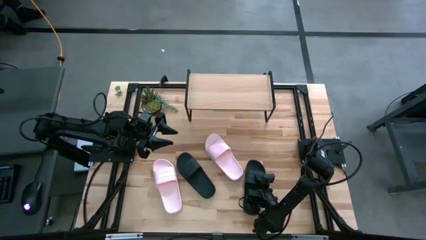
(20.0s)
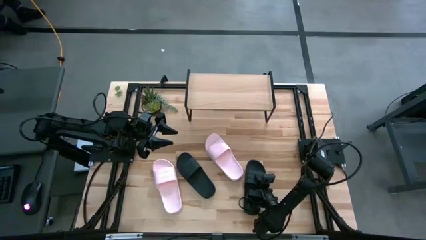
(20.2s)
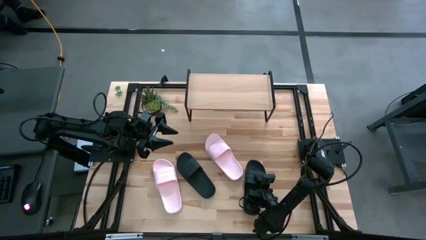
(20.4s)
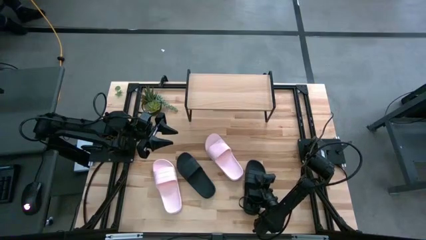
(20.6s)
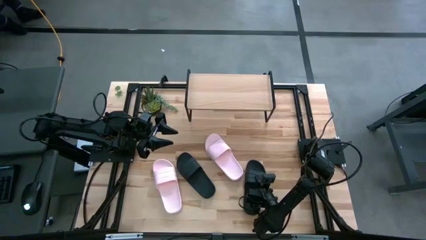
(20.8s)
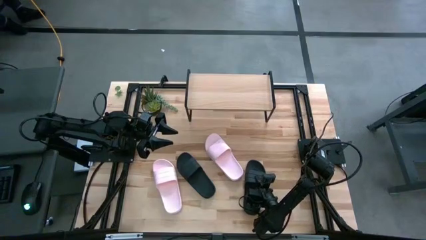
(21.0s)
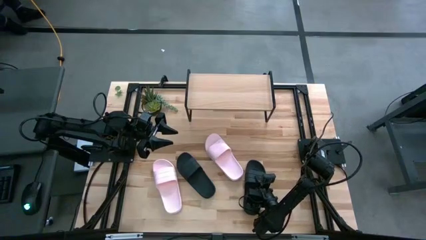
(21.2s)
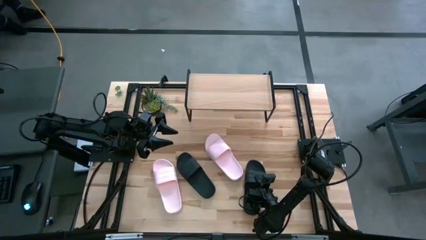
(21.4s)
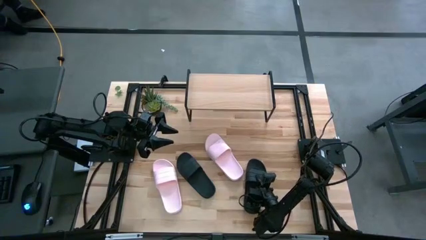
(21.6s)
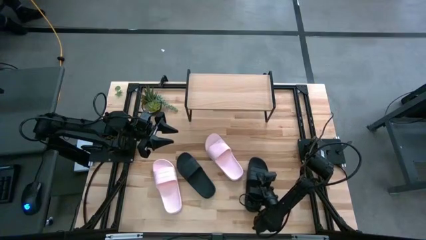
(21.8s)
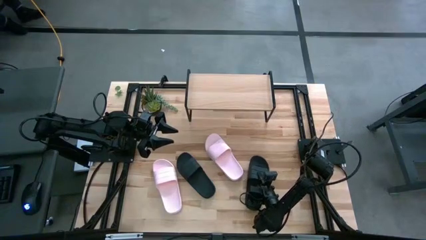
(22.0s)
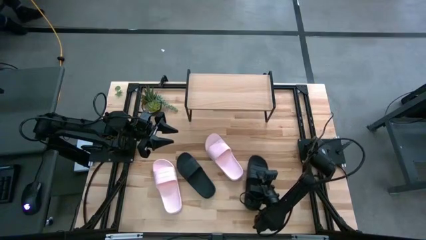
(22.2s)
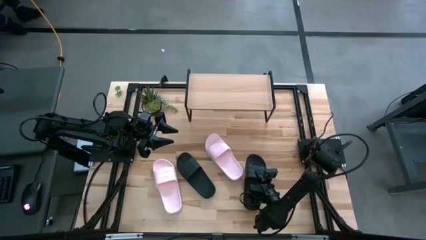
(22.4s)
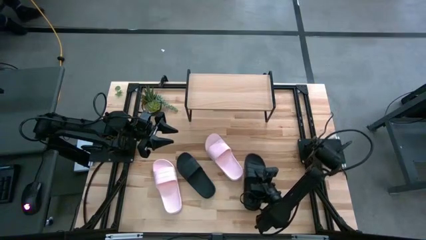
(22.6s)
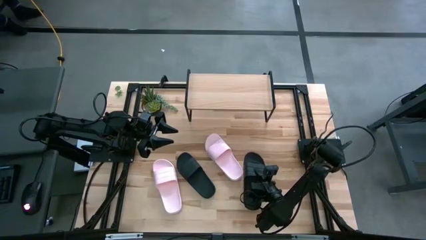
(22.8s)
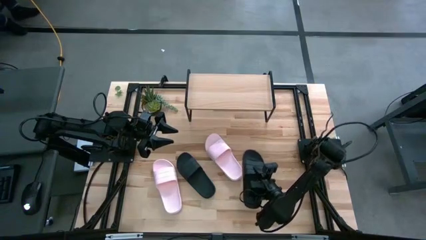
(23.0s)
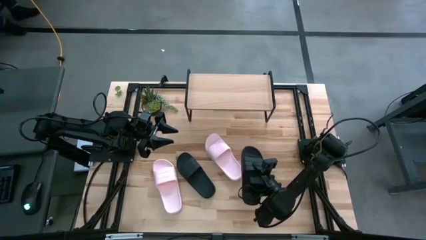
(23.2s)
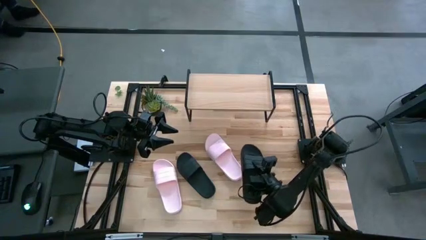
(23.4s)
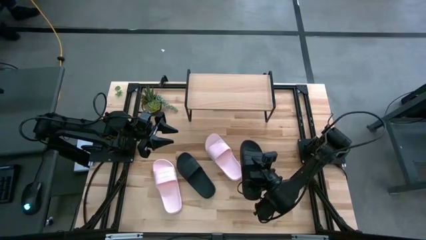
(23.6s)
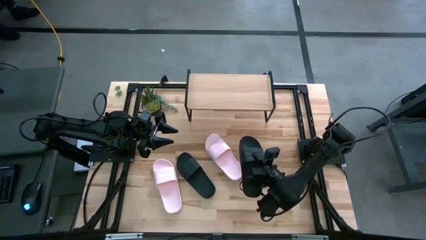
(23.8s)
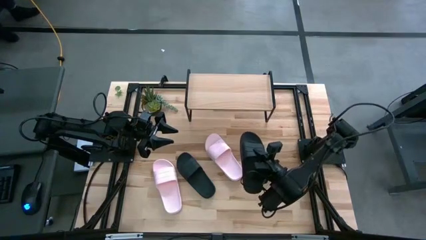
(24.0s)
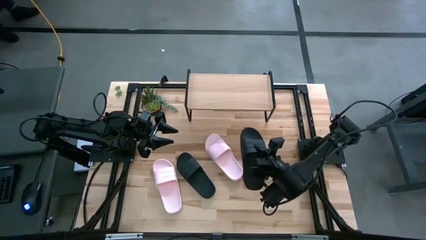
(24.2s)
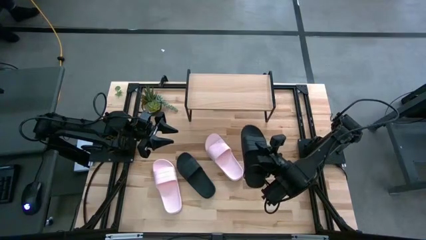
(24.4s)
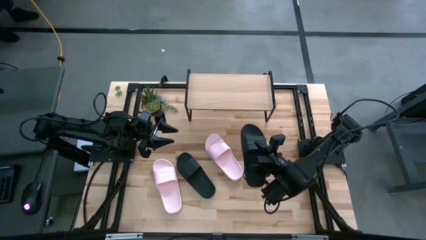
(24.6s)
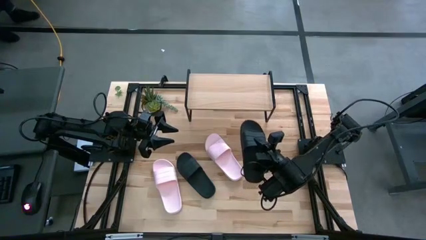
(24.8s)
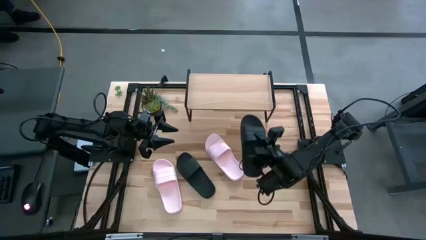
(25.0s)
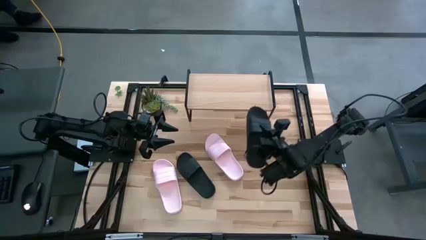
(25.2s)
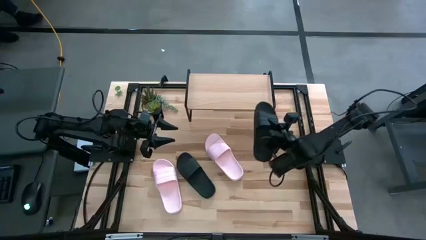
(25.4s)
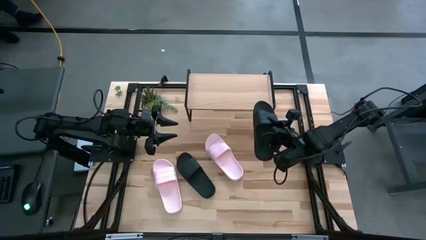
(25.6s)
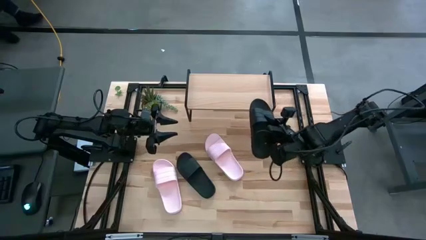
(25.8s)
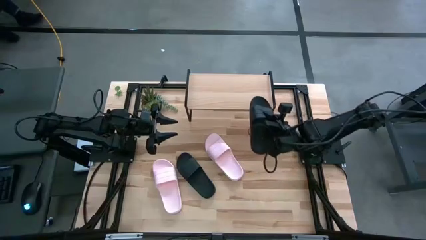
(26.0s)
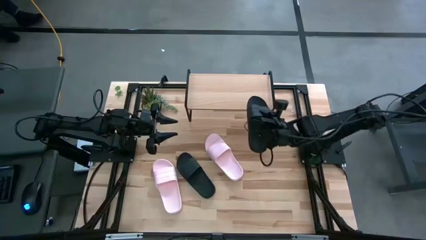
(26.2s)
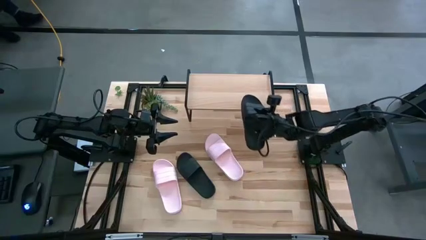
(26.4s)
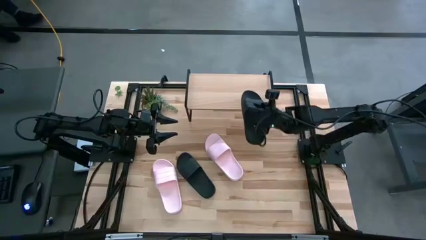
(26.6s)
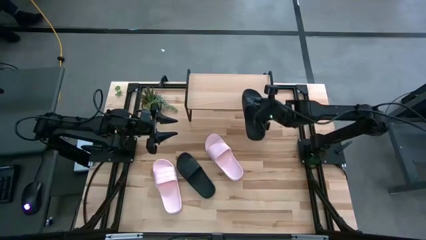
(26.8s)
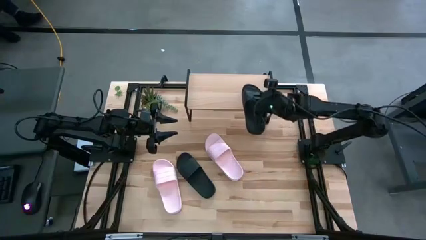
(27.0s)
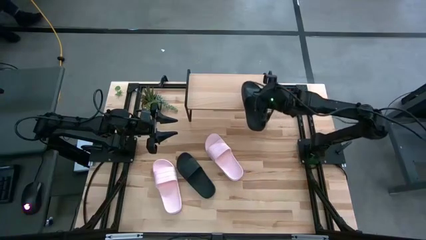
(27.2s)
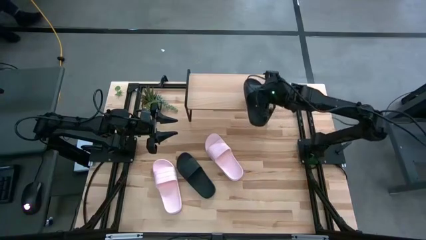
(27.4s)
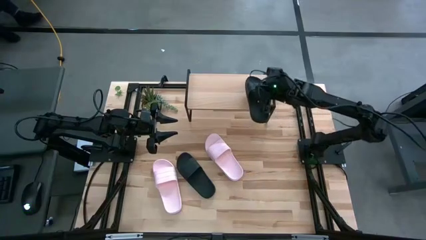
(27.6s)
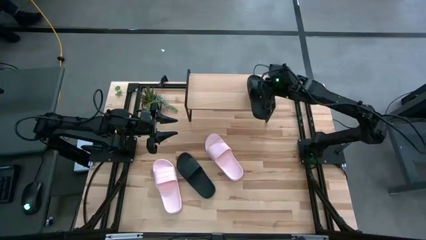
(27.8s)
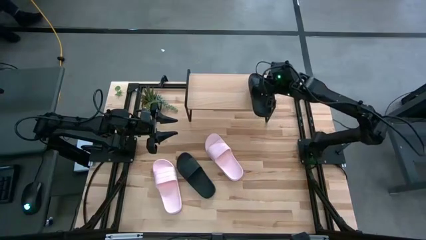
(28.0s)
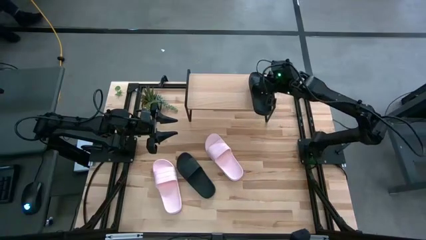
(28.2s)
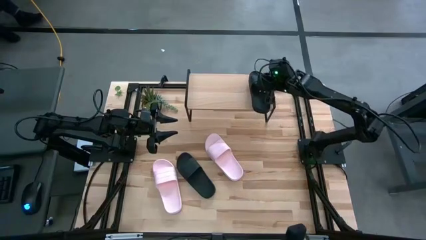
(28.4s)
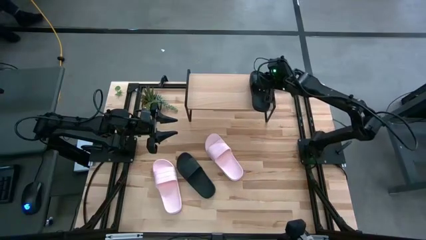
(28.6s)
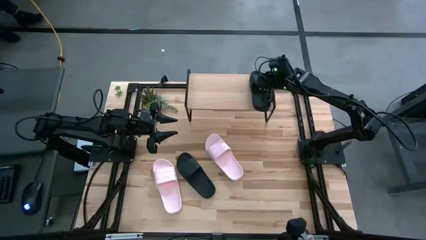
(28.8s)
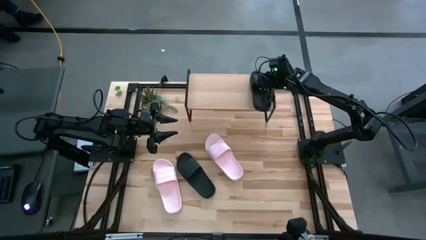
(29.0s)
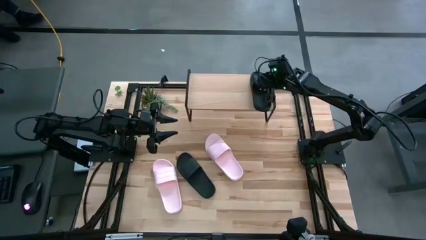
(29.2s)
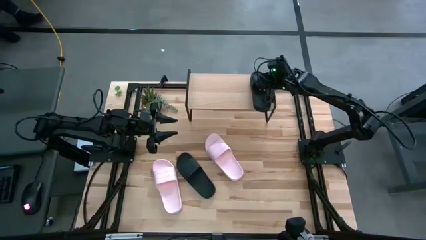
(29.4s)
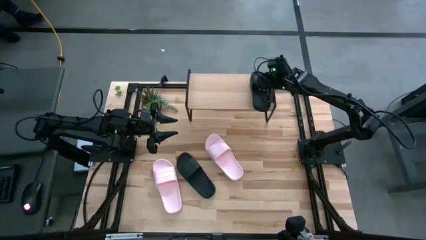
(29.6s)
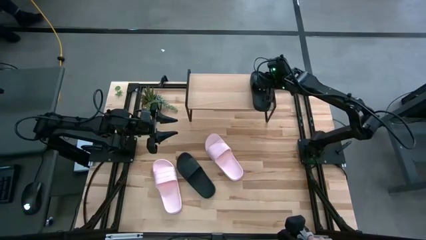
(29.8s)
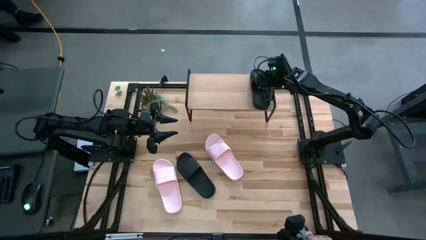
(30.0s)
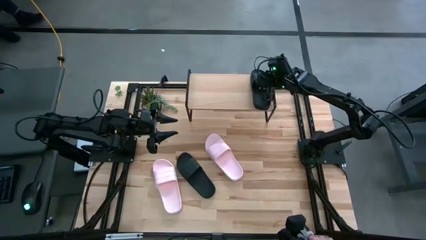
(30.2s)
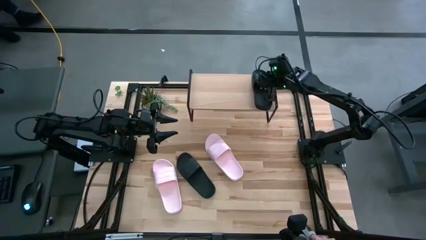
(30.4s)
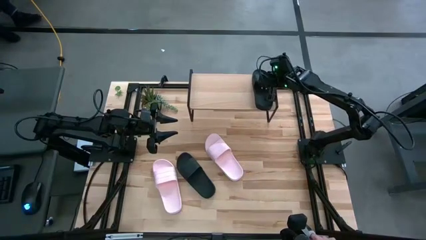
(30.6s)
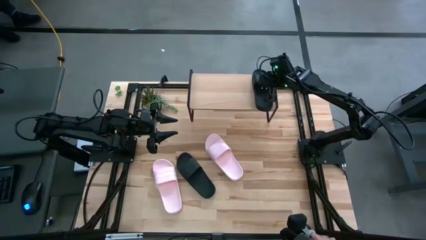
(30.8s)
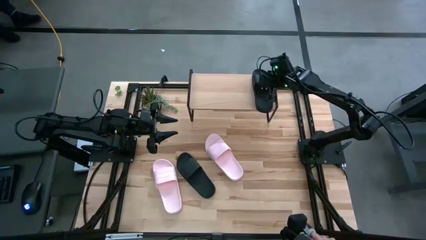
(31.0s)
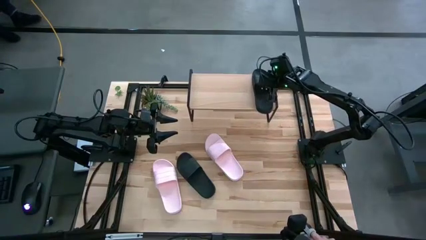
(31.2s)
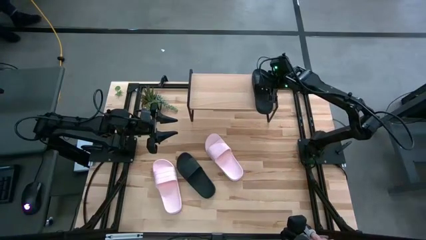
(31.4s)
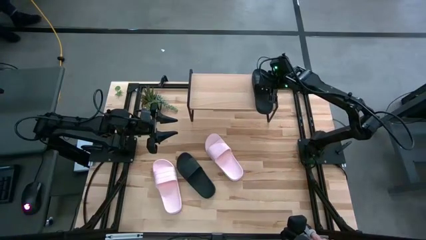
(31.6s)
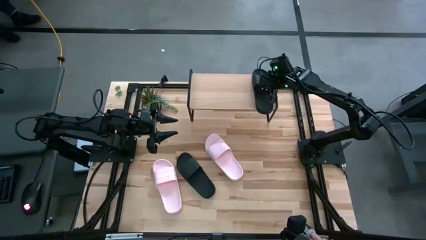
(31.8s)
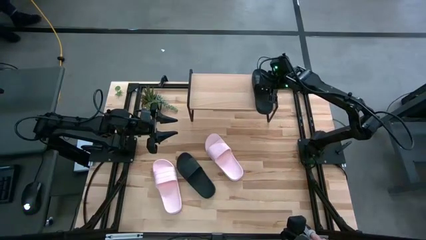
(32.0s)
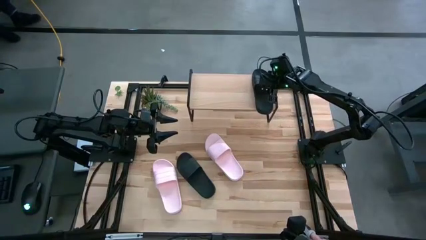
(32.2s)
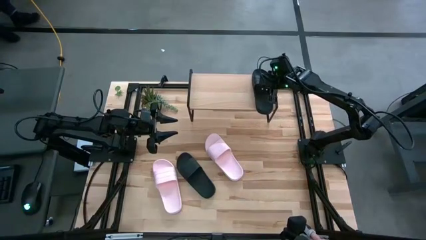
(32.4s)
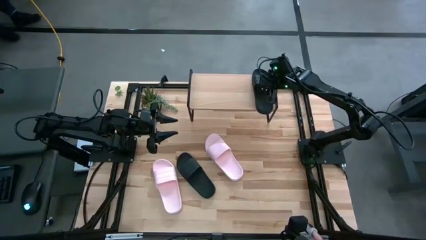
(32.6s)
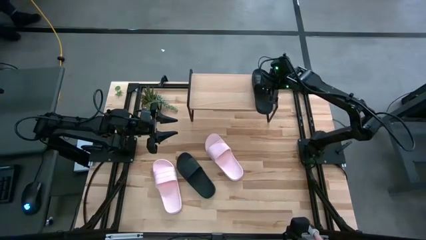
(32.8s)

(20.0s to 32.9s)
Task: Pick and place slides into the shelf
Put the right black slipper on the shelf

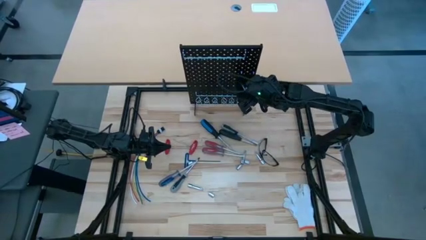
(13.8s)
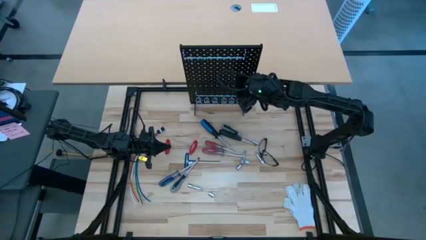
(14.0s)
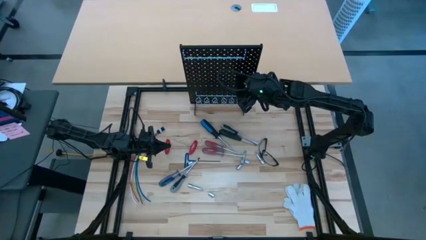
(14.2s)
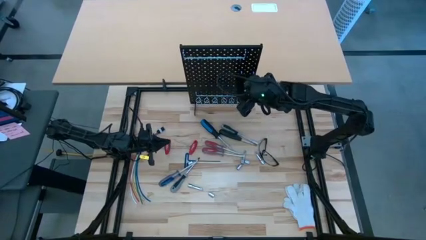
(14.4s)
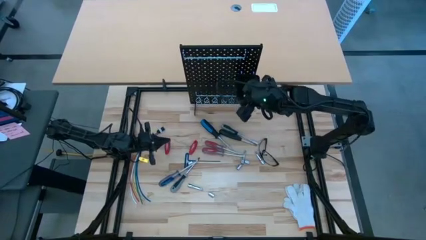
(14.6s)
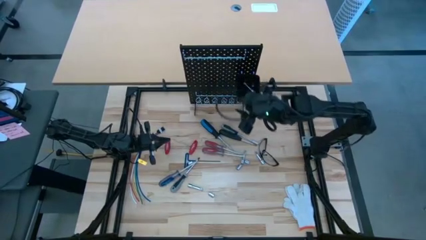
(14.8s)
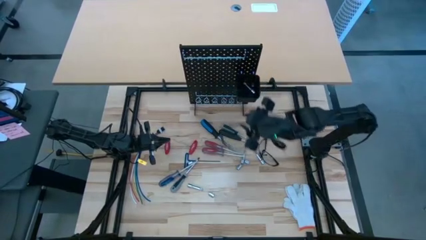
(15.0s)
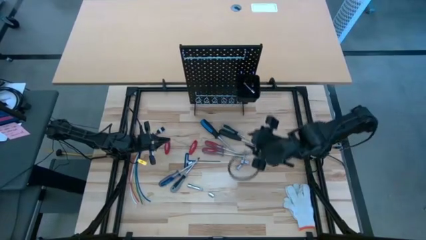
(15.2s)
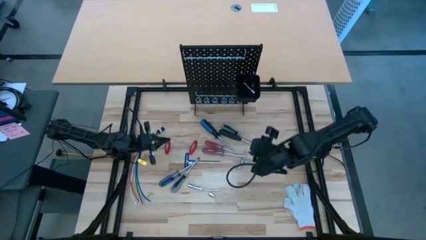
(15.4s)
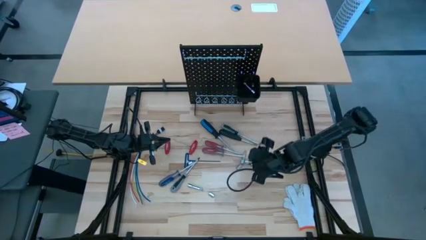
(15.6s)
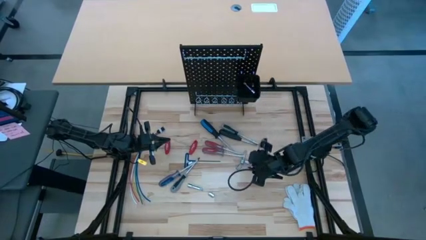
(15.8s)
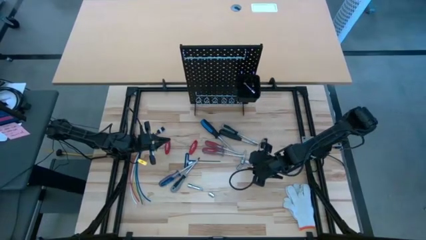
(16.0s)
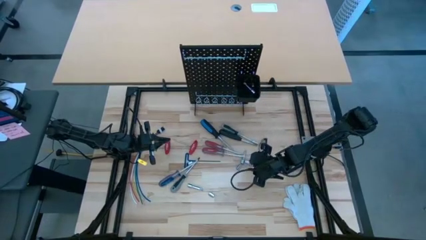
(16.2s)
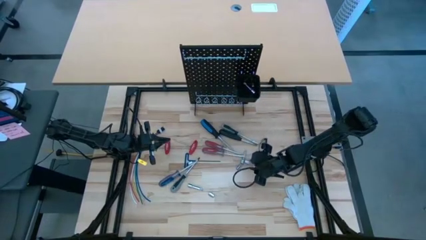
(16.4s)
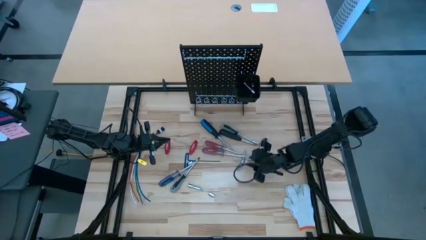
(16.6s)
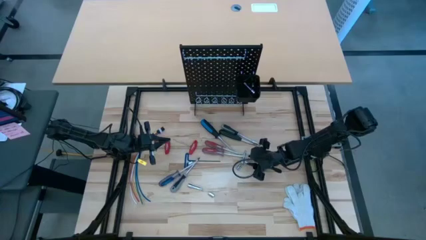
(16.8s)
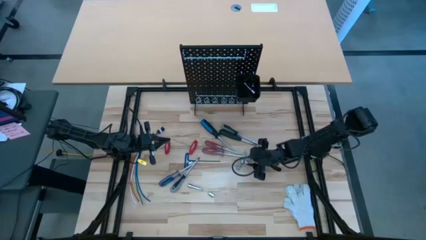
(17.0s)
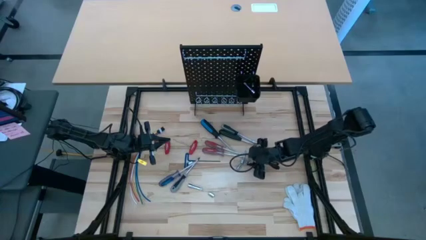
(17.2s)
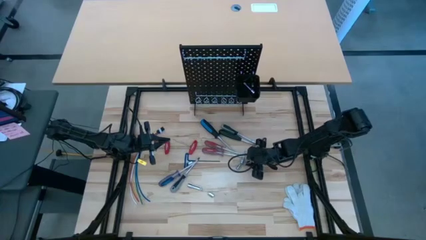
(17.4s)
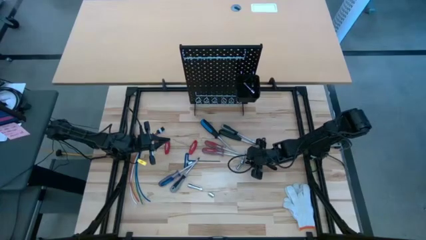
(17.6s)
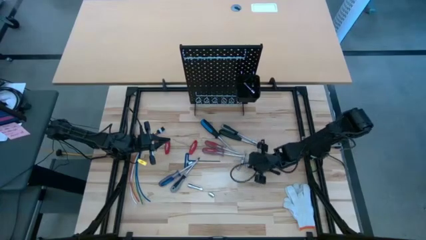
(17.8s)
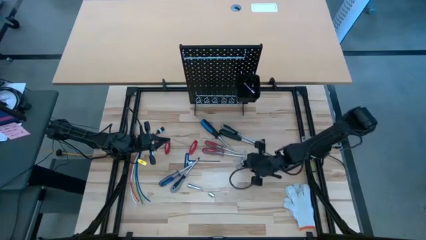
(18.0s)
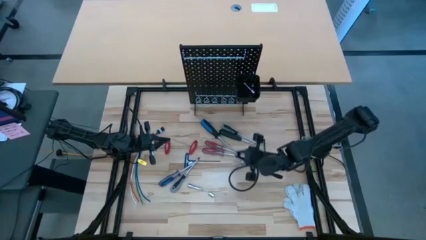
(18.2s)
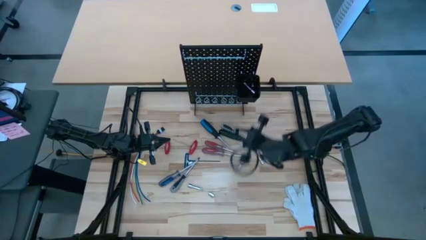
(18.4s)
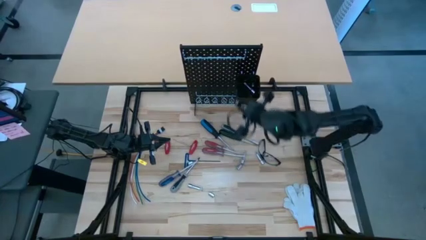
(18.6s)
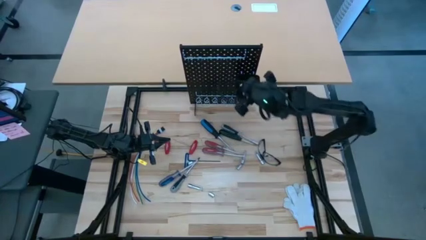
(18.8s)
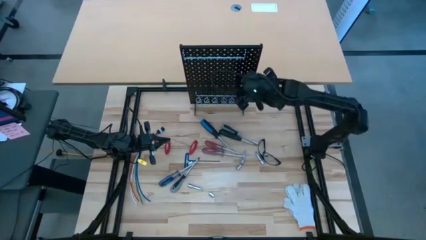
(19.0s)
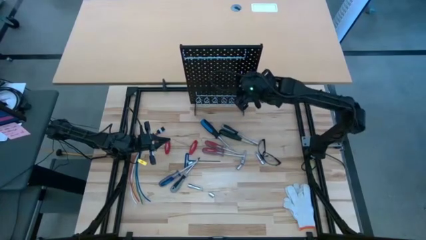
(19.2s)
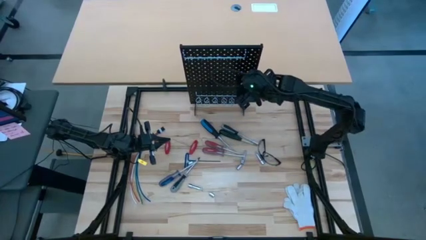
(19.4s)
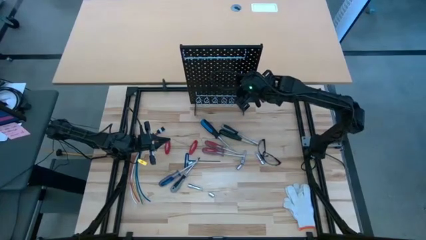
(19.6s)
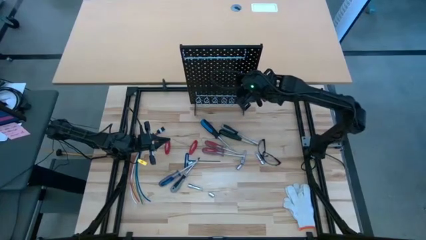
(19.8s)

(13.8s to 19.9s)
Task: Hang tools onto peg board
Put the socket into the bin of the pegboard
